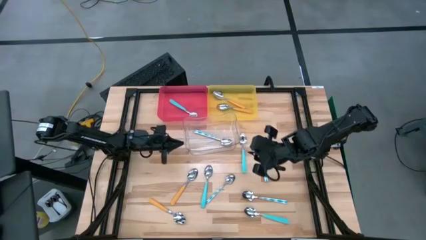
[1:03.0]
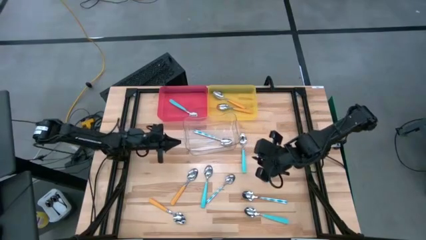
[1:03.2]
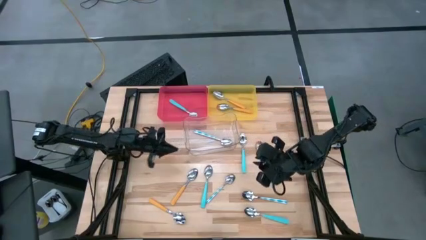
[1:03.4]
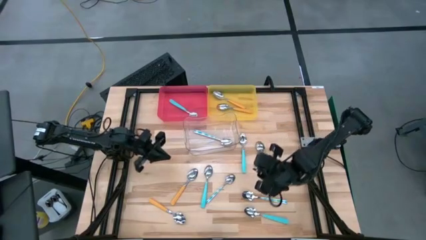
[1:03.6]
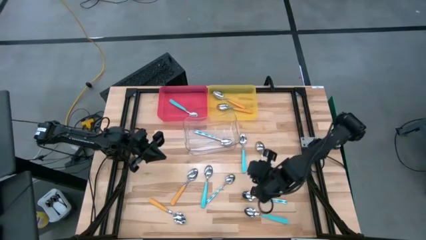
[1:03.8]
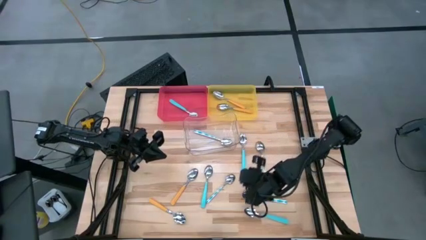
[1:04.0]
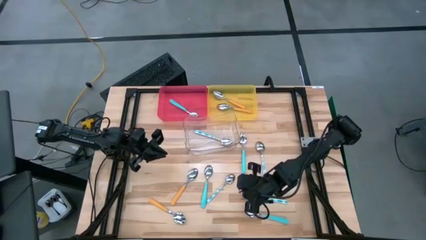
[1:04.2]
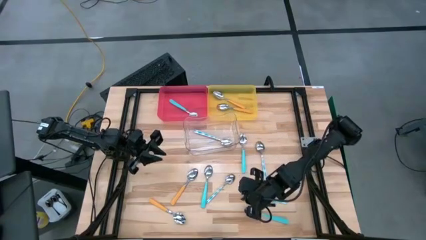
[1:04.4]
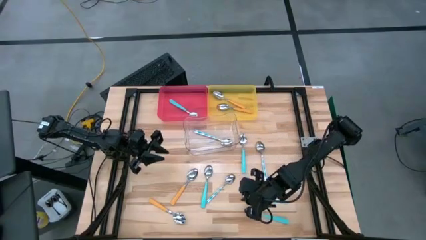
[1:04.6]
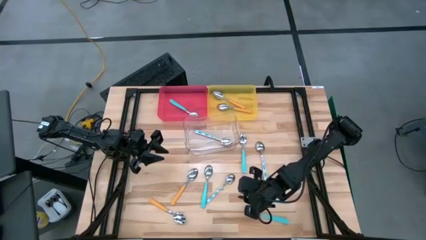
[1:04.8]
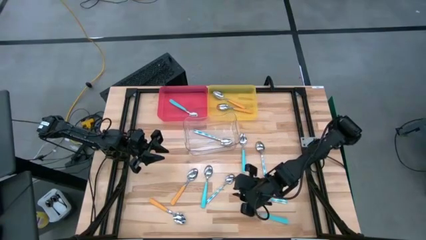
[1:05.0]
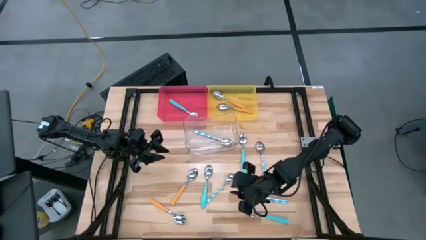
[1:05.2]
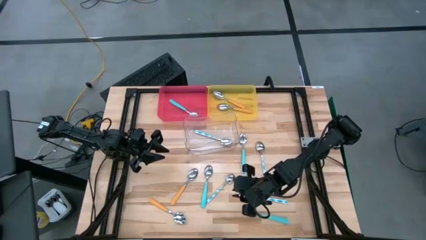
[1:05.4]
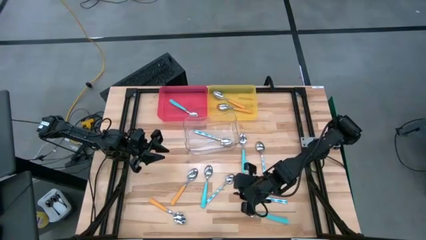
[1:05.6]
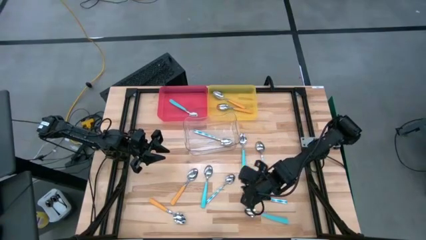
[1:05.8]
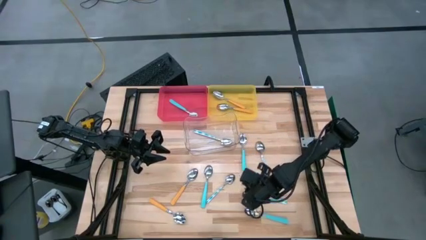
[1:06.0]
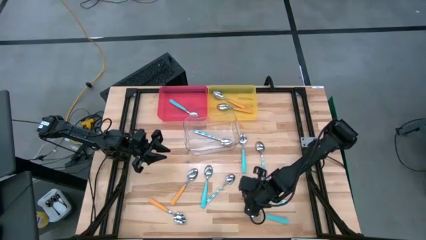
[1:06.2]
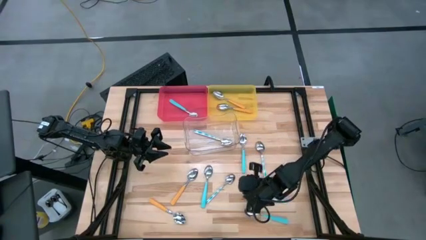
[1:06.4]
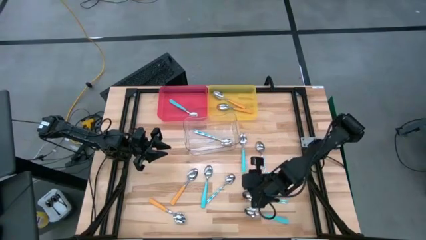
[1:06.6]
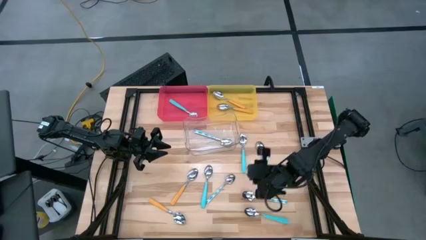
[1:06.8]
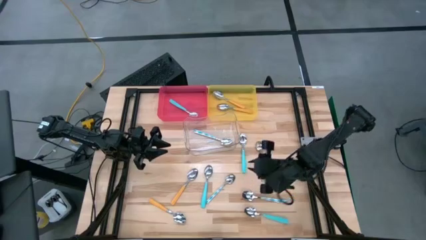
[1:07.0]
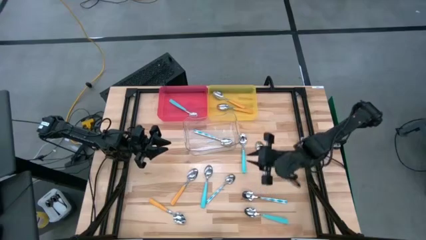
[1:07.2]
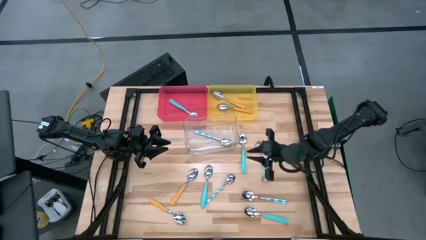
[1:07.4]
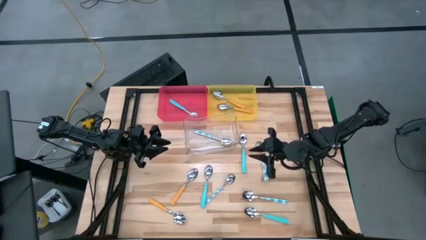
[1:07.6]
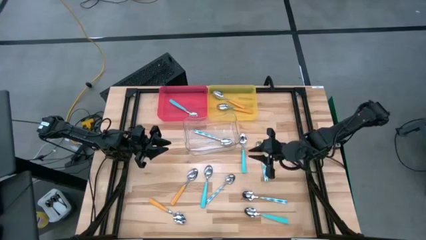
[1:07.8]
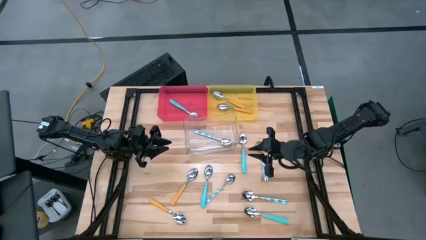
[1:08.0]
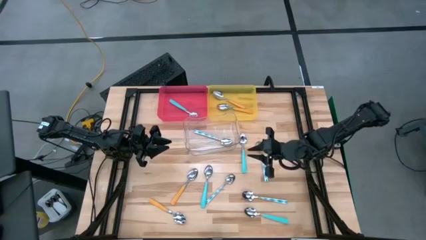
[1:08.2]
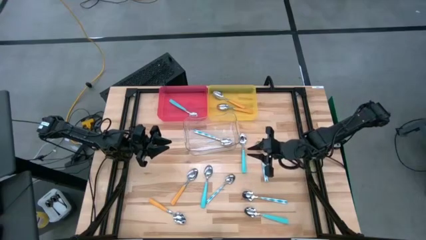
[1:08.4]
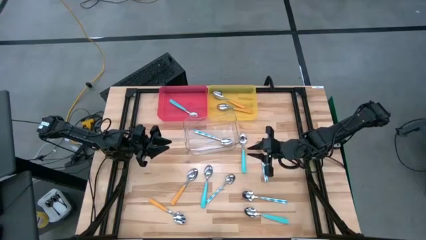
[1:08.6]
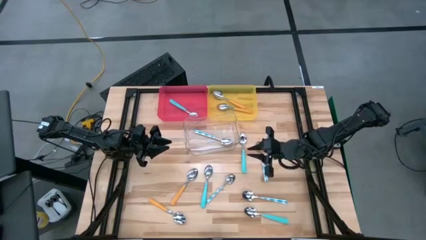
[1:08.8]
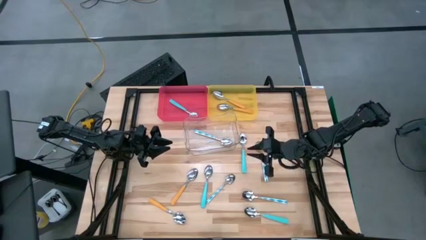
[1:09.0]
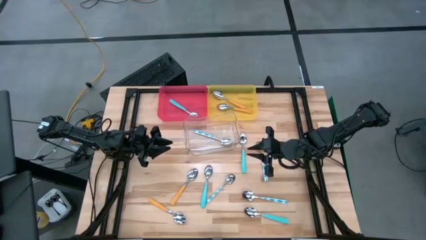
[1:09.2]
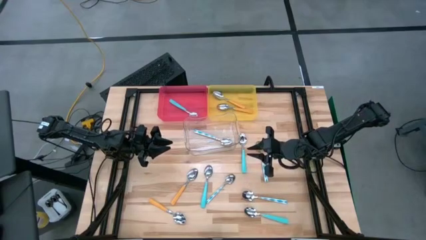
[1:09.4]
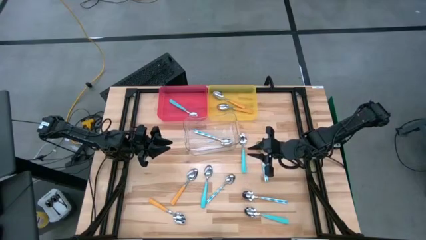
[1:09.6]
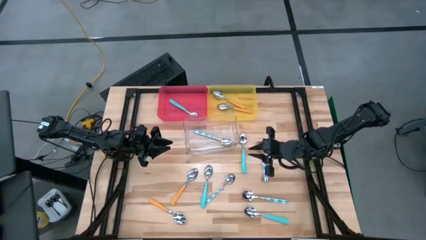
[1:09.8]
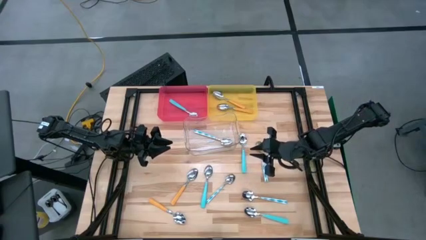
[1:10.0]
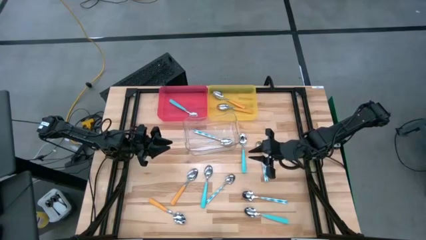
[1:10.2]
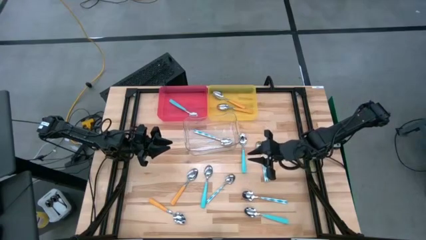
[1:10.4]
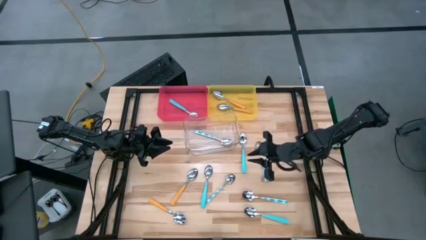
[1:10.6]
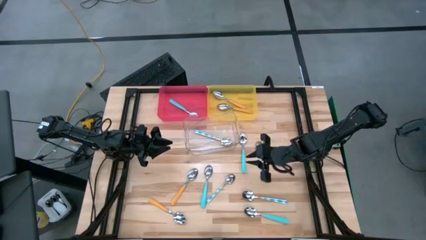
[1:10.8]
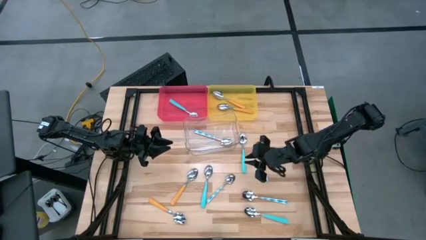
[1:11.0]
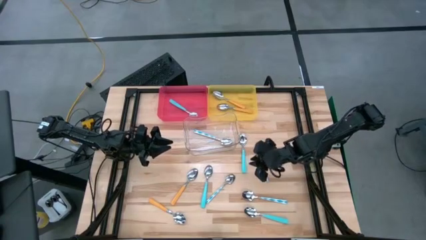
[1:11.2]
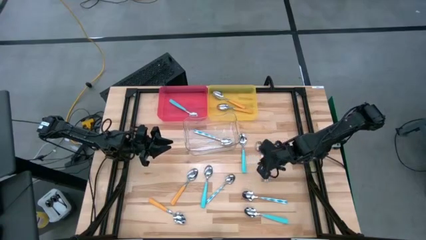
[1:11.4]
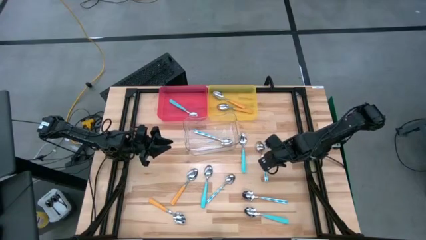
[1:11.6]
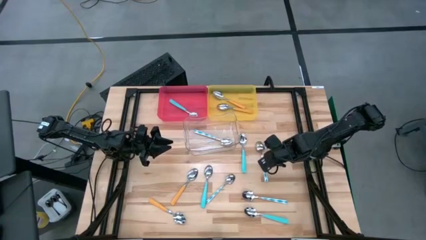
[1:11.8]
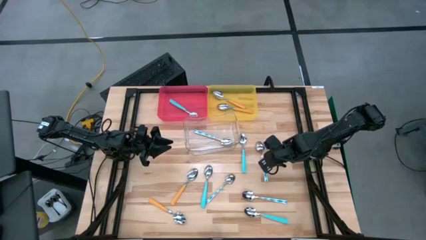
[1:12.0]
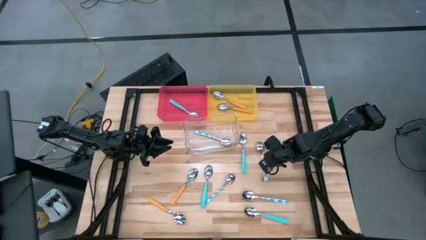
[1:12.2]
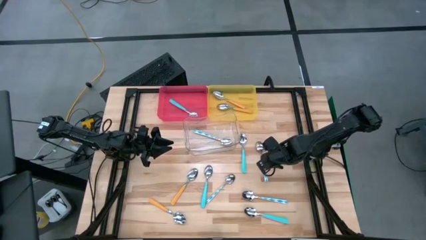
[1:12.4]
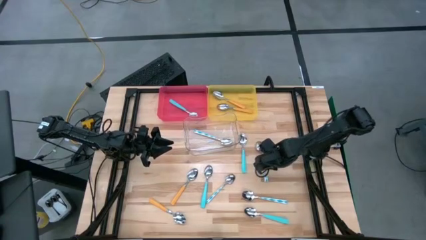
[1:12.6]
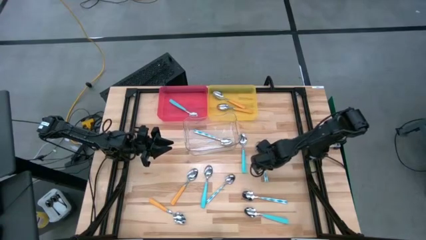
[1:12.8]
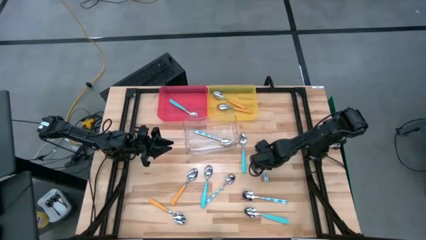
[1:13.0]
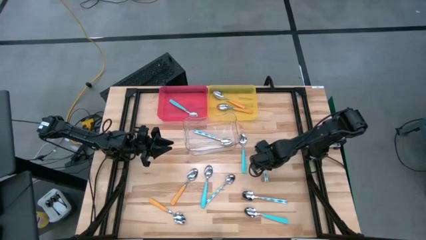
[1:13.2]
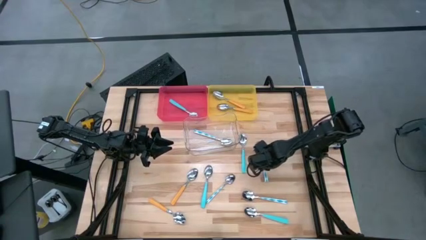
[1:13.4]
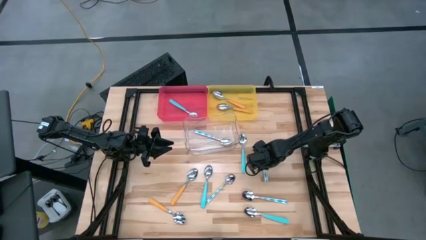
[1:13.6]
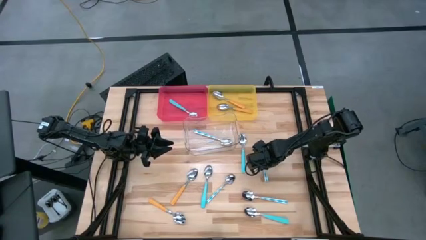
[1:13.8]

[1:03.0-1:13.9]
Task: Sort silverware by color (type)
Put the green patterned spoon into the transparent bin
